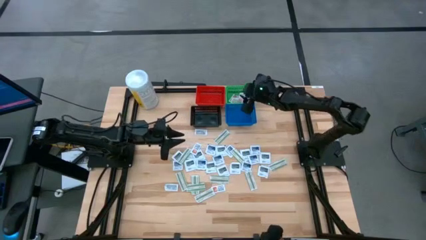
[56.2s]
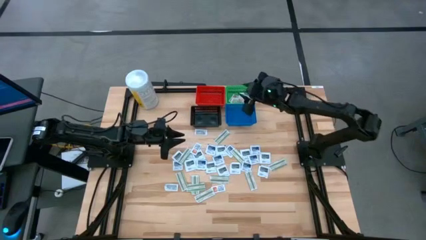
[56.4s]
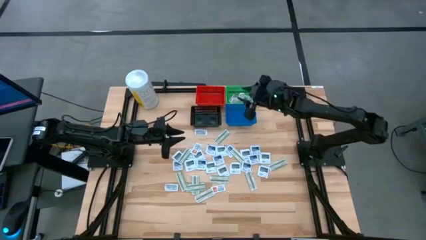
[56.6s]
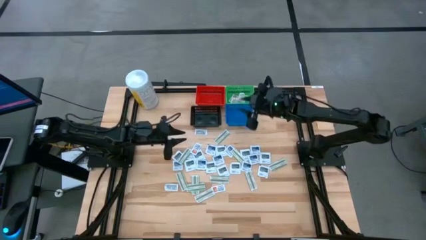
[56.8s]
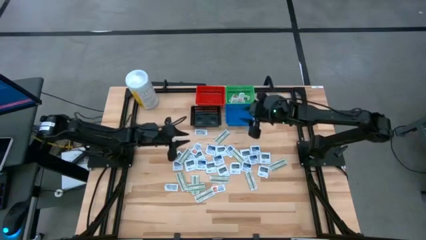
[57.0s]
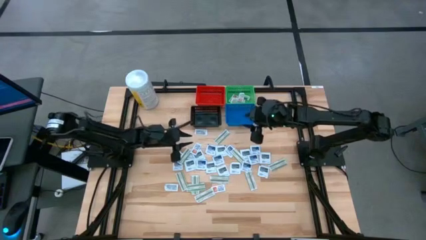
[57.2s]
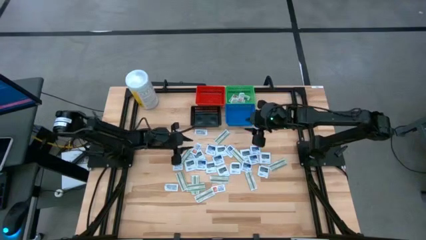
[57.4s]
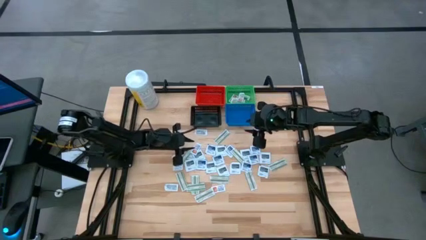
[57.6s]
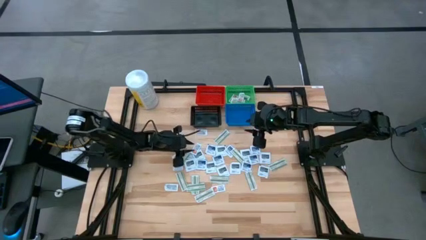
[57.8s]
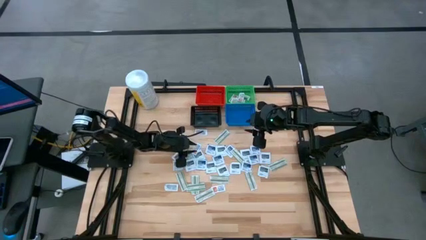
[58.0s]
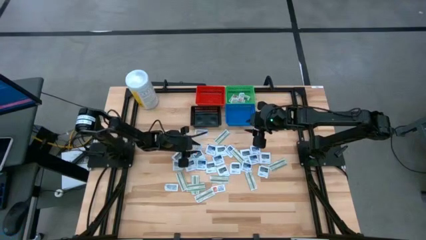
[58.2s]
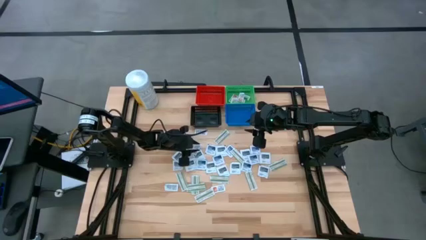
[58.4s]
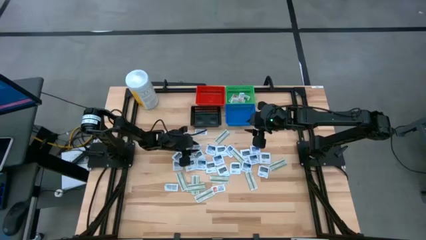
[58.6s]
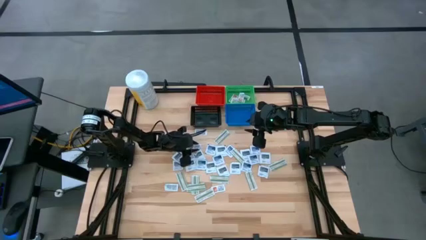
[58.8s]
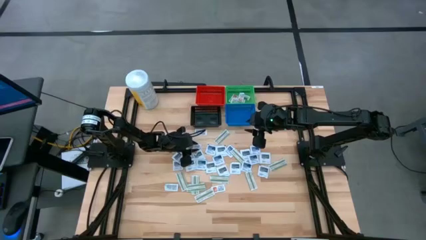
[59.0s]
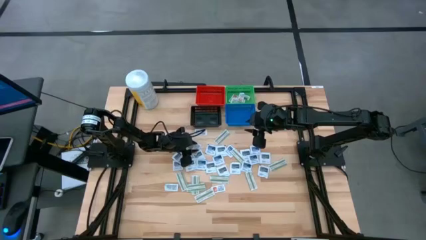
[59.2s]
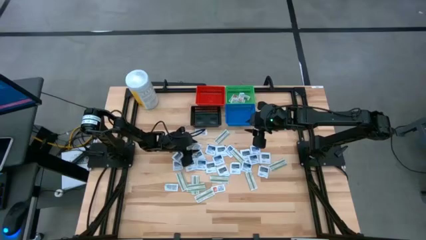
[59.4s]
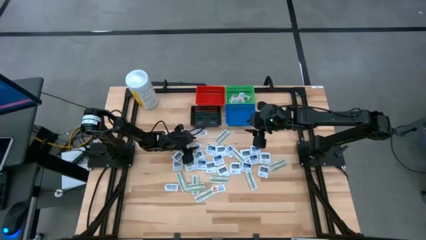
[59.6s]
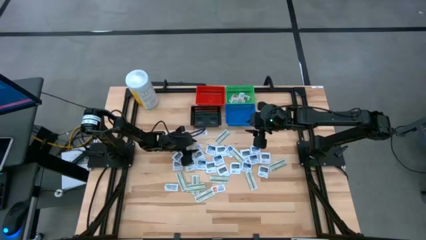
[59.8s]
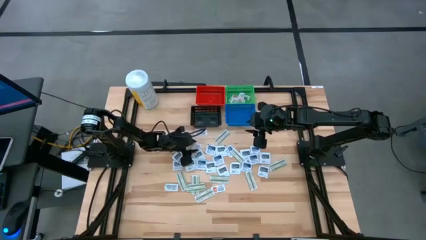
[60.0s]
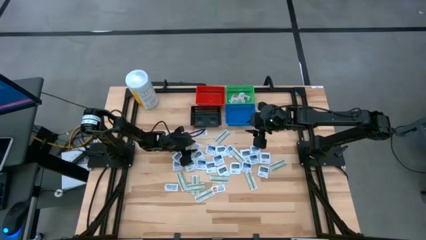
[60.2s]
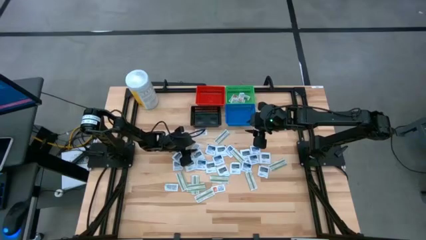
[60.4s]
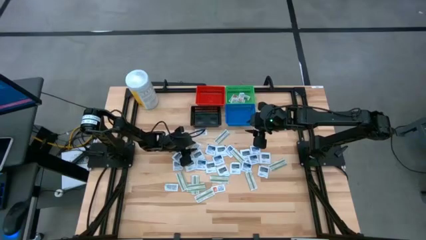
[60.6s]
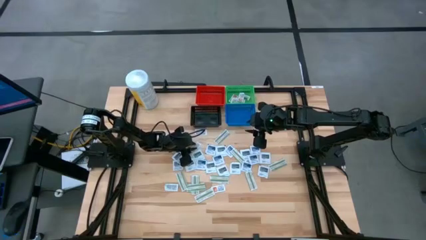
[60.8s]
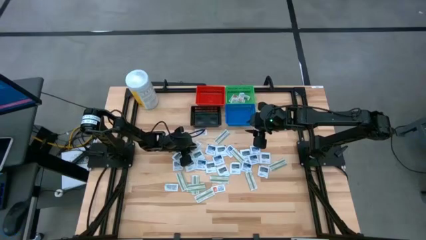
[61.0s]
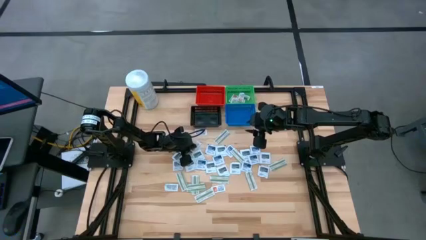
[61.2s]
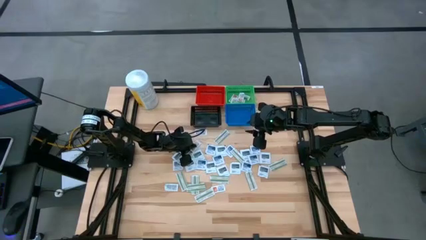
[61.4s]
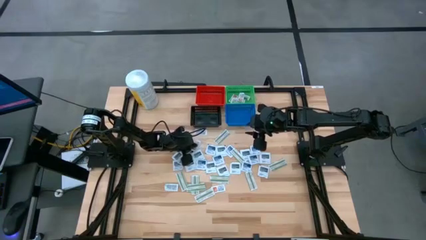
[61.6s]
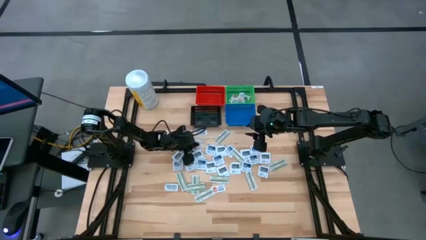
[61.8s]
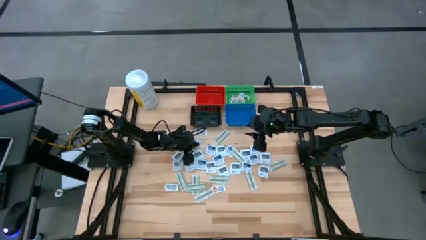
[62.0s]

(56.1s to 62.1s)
Task: Pick & Place First Aid Supplies
Put the ointment pack into the green basket

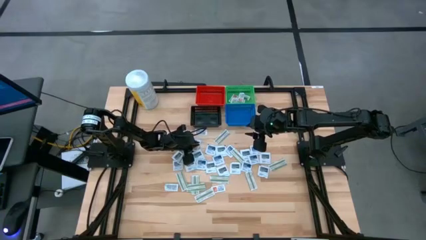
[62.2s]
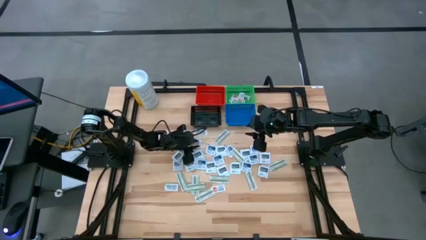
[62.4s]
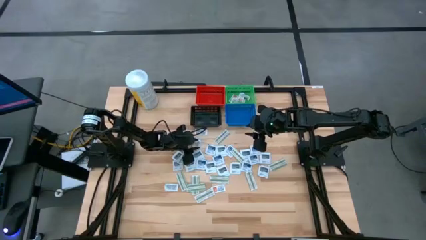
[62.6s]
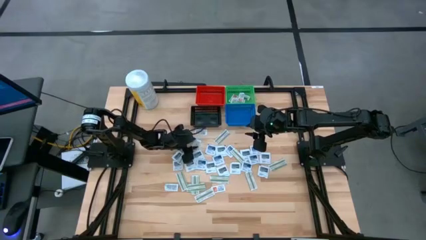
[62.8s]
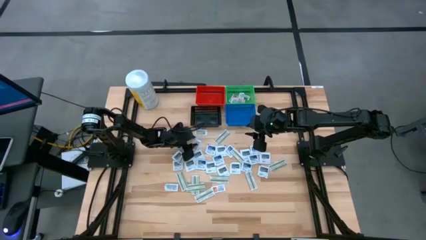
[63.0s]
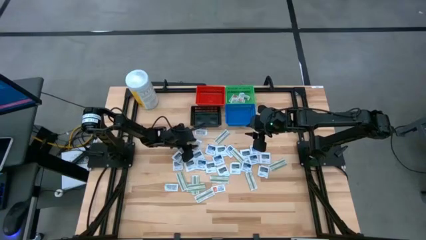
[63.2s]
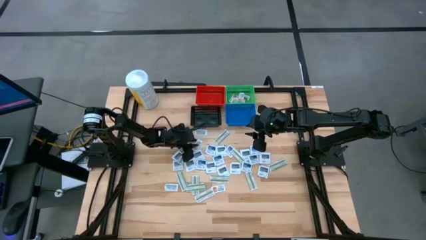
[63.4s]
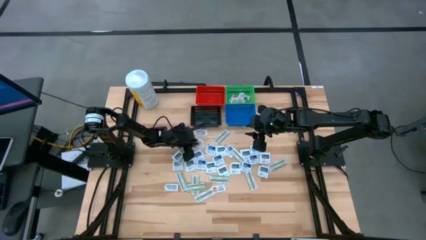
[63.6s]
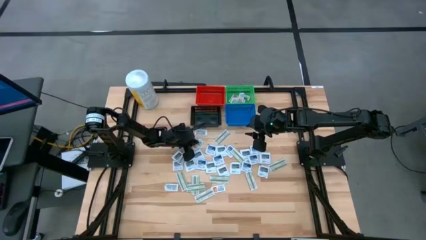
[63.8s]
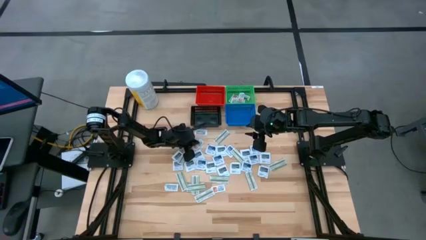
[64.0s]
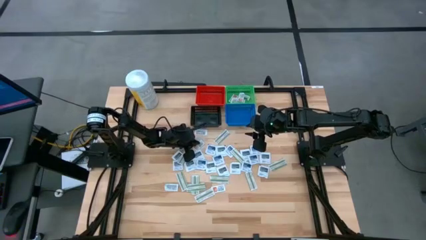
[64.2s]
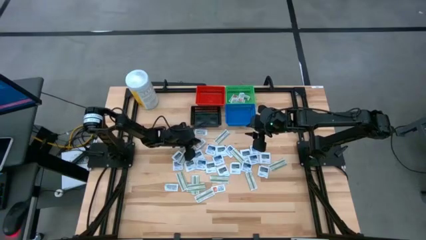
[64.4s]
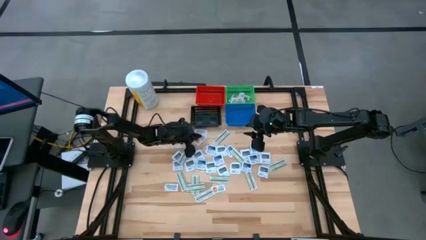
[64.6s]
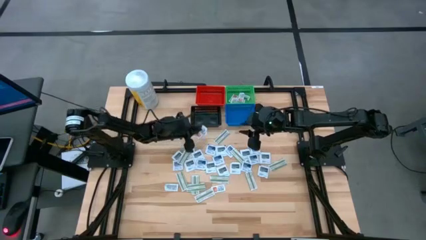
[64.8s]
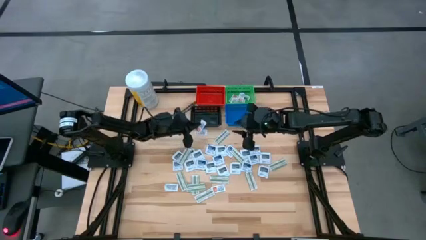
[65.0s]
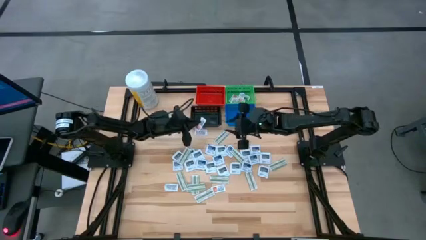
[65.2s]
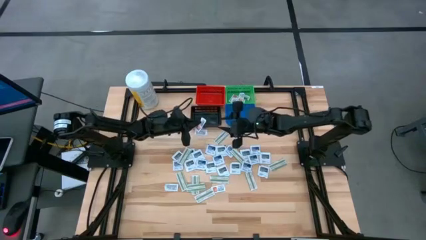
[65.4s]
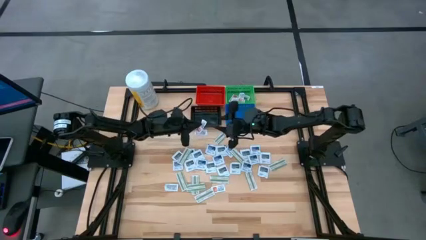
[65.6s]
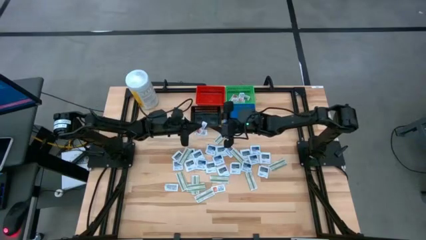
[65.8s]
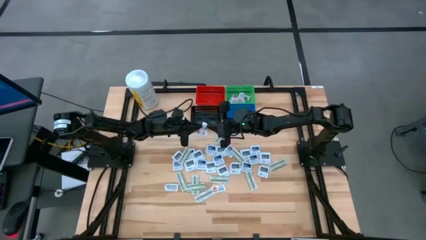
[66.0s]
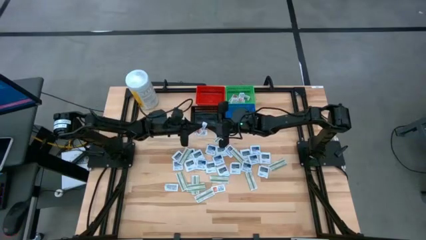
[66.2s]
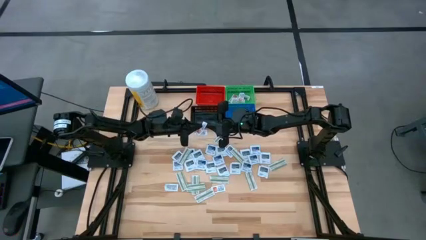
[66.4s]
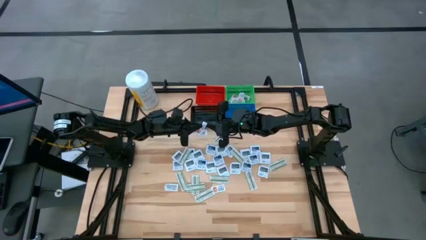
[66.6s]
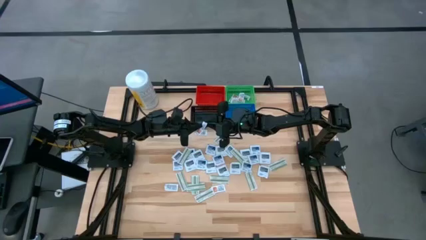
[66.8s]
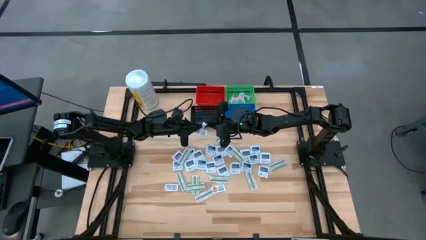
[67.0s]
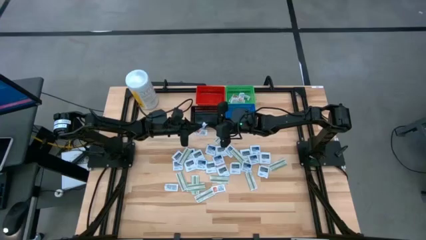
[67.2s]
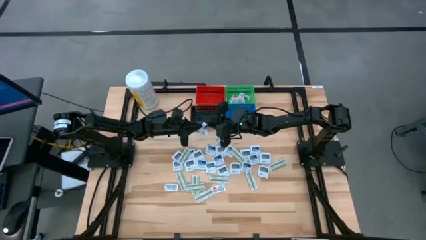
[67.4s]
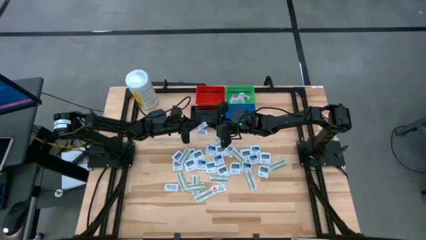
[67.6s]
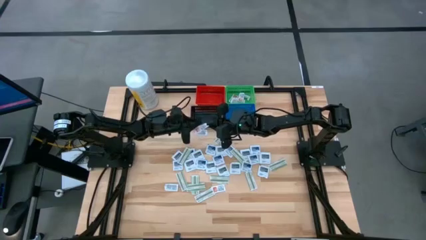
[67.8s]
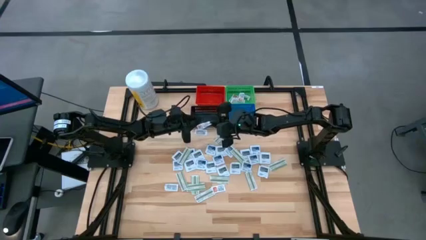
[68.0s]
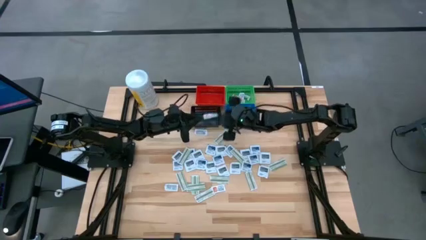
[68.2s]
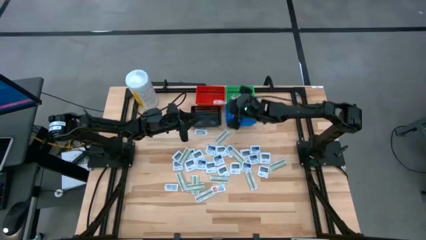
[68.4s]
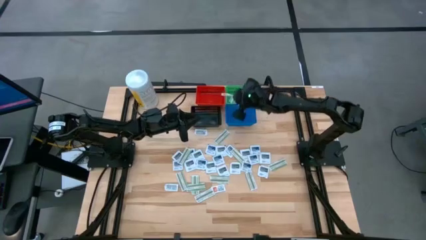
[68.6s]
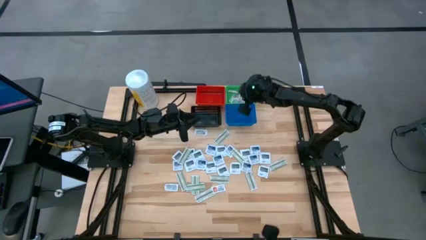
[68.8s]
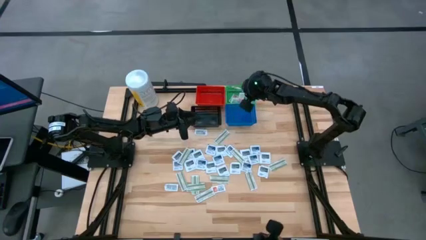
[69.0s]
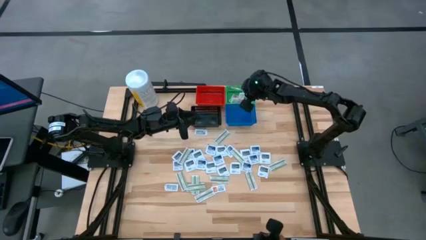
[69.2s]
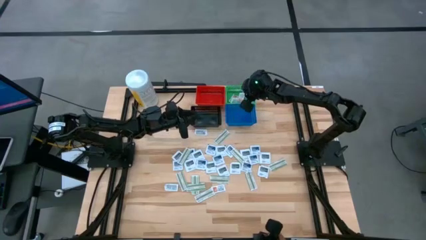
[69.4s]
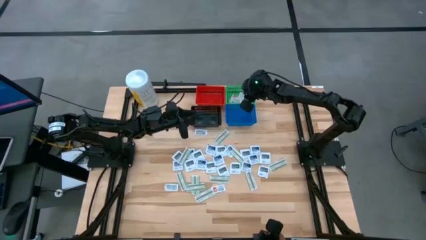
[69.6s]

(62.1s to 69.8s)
Put the ointment pack into the green basket

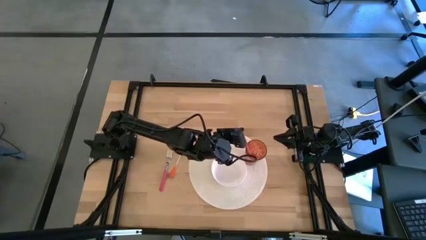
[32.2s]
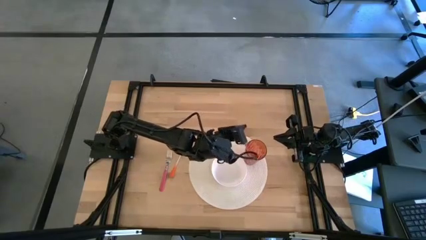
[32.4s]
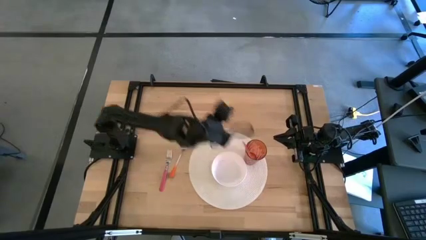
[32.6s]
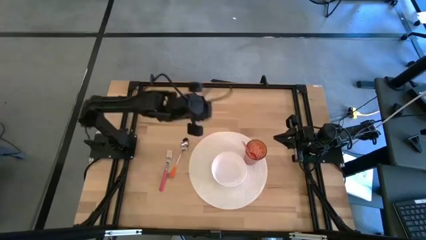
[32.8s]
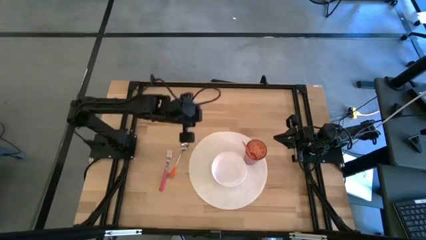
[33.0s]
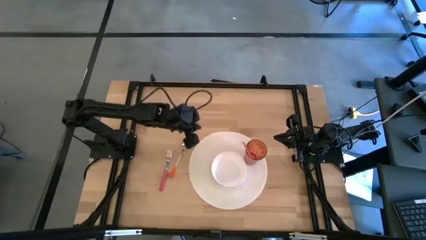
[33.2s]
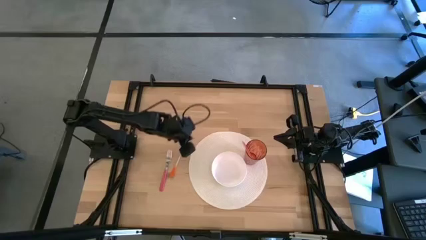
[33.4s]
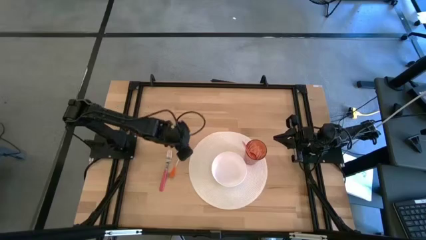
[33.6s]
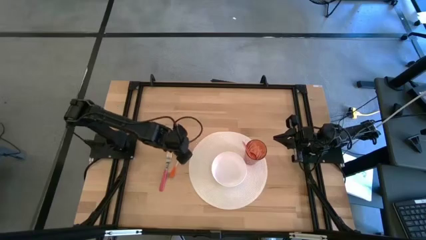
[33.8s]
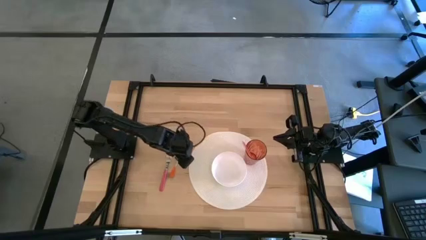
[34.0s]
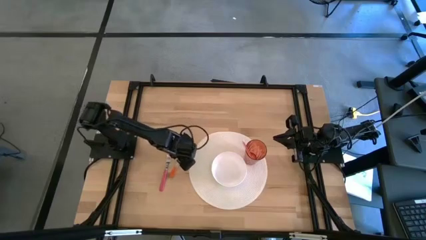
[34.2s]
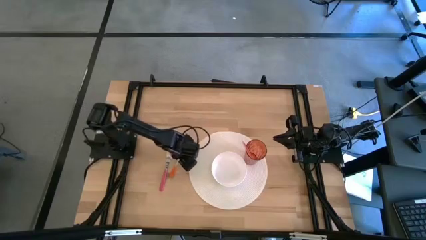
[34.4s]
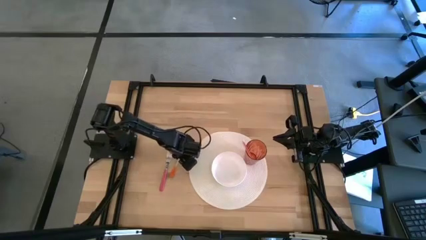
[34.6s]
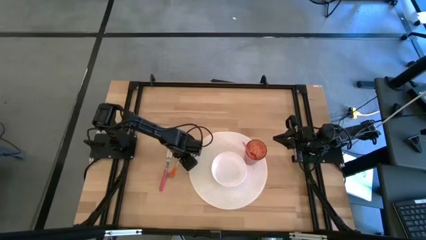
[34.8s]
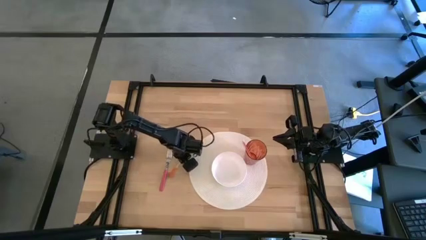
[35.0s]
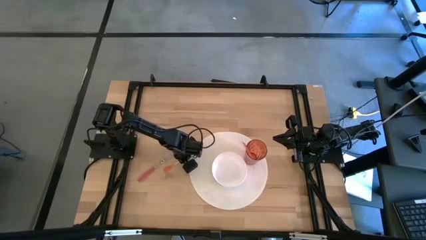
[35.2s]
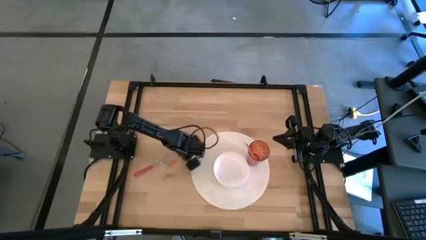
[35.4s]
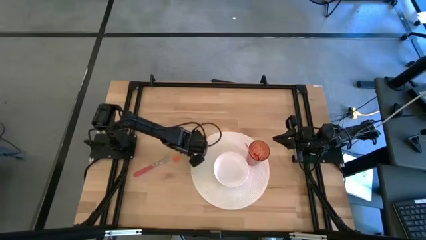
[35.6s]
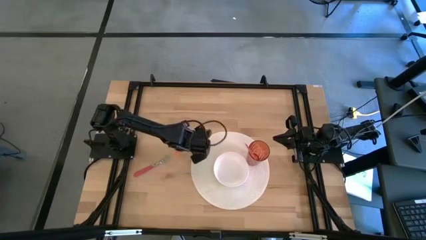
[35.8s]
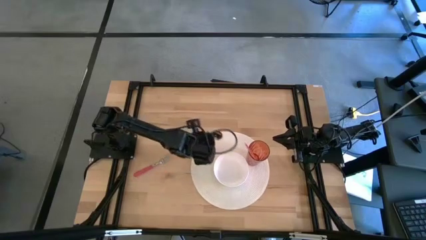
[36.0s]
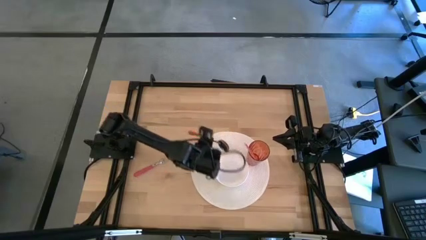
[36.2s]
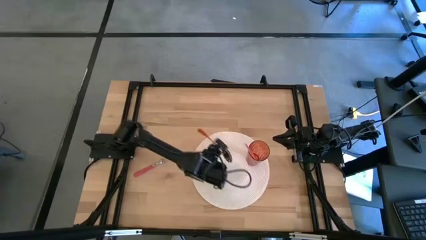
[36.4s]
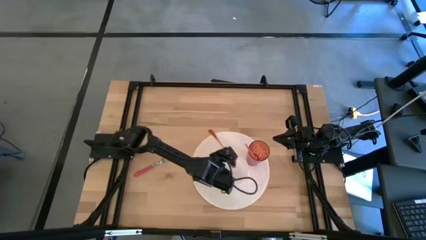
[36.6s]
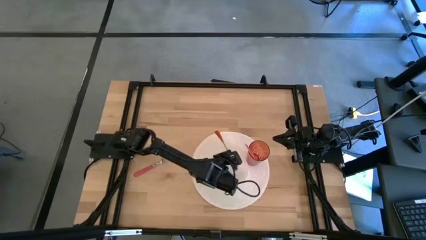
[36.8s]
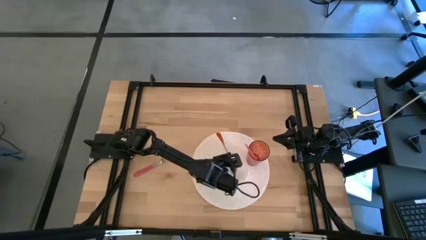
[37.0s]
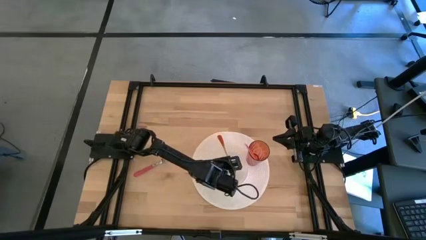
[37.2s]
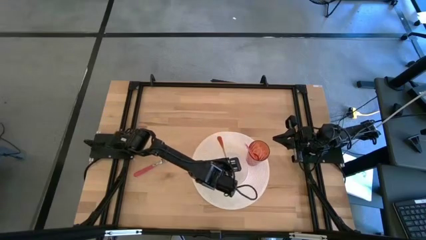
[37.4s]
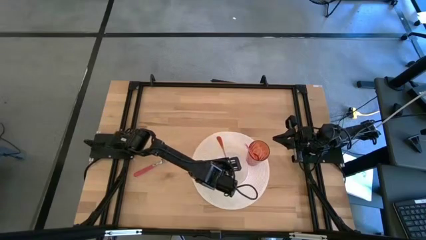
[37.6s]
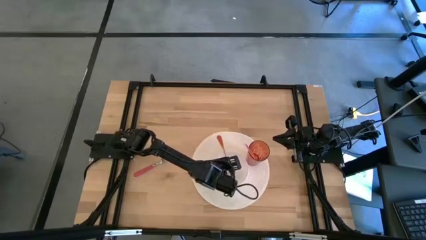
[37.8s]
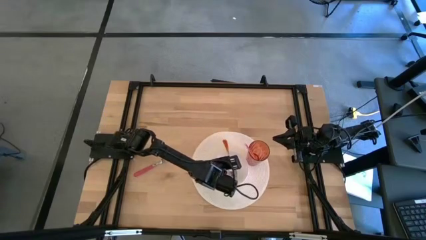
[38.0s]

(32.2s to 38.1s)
Task: Pick & Place Utensil
Put the orange spoon into the white bowl
